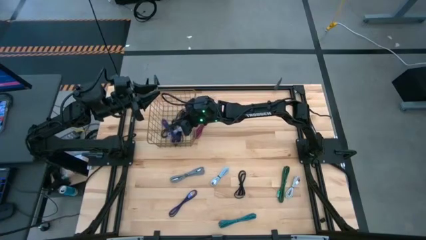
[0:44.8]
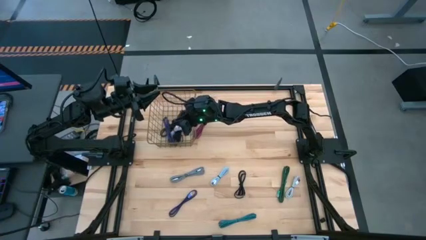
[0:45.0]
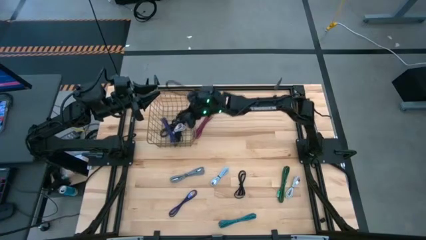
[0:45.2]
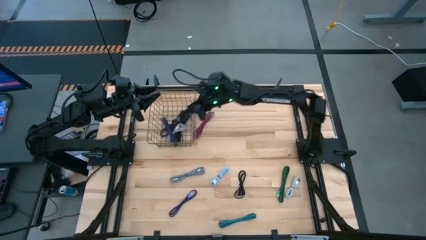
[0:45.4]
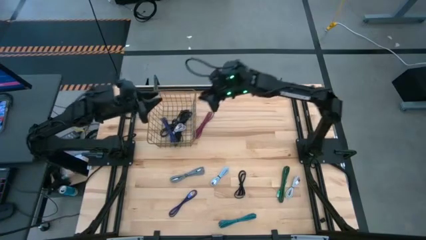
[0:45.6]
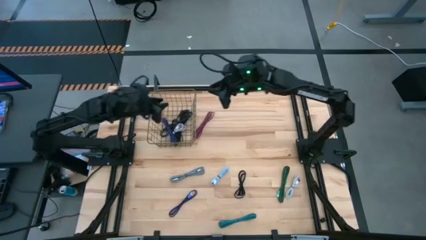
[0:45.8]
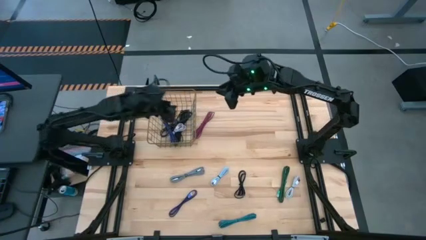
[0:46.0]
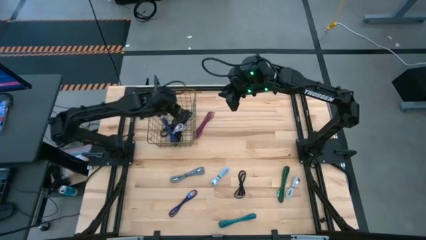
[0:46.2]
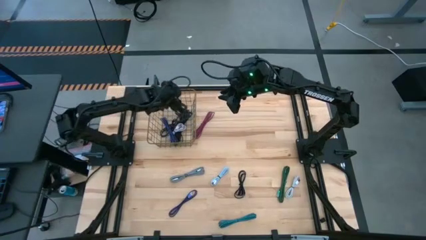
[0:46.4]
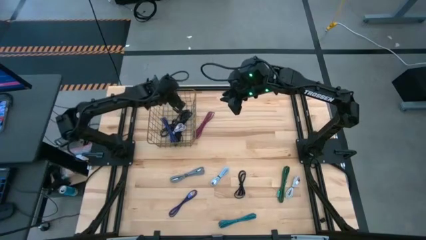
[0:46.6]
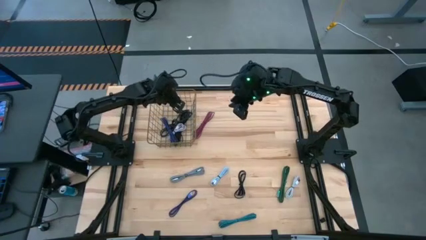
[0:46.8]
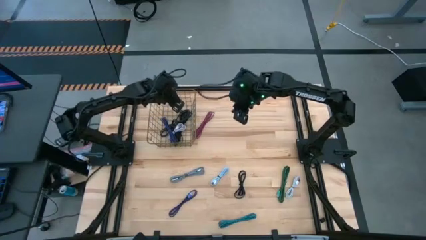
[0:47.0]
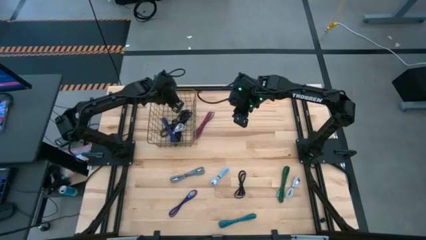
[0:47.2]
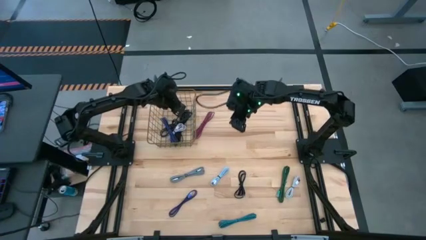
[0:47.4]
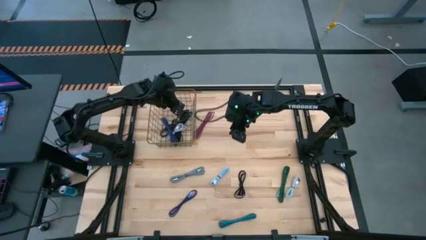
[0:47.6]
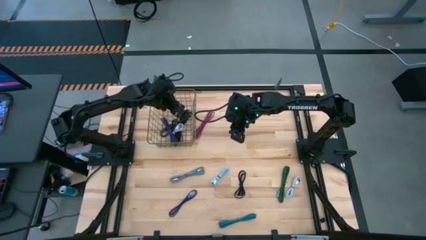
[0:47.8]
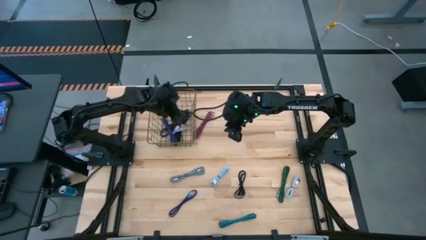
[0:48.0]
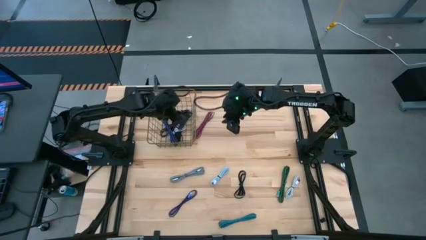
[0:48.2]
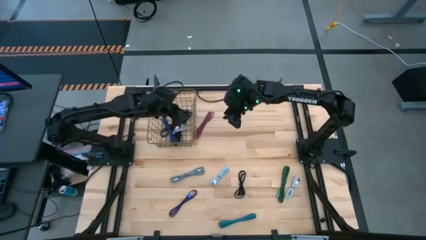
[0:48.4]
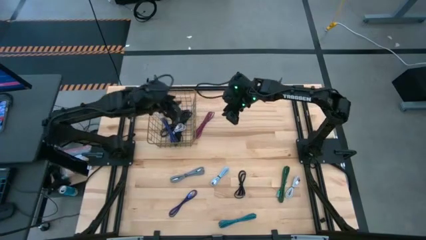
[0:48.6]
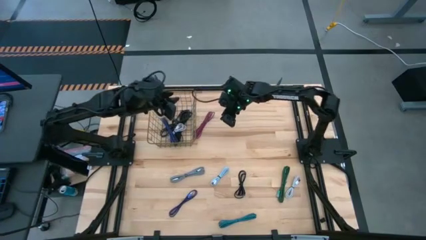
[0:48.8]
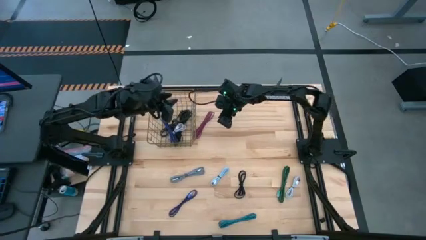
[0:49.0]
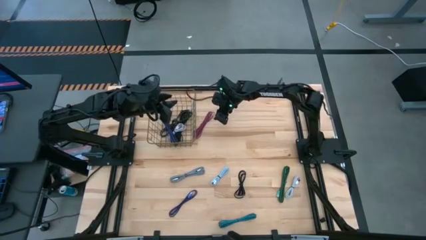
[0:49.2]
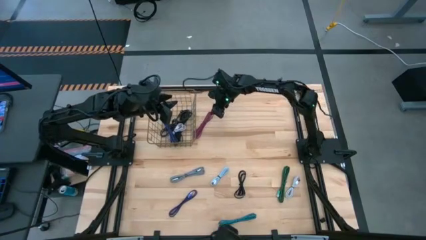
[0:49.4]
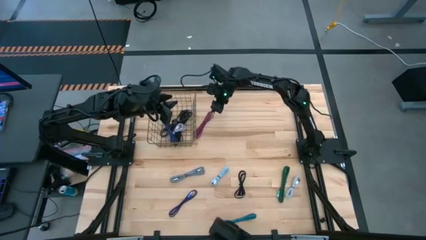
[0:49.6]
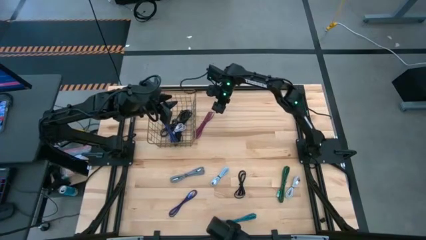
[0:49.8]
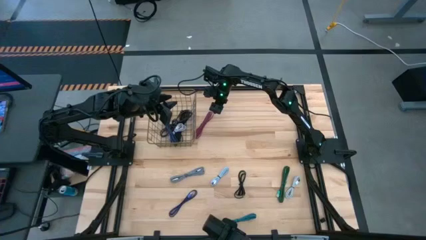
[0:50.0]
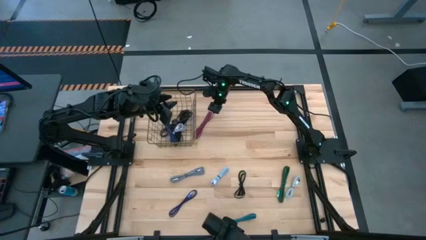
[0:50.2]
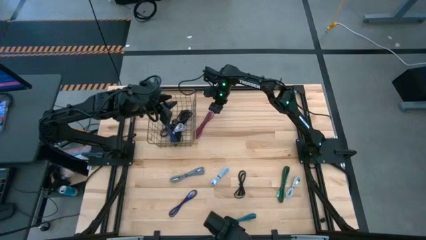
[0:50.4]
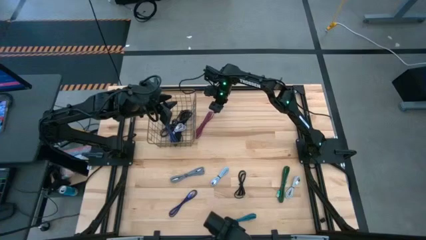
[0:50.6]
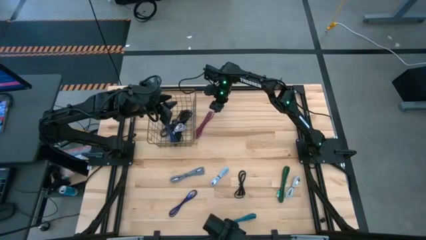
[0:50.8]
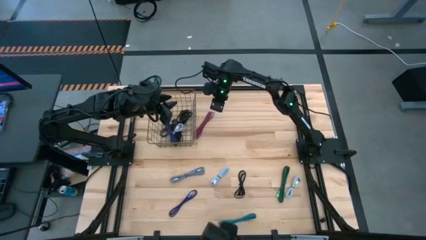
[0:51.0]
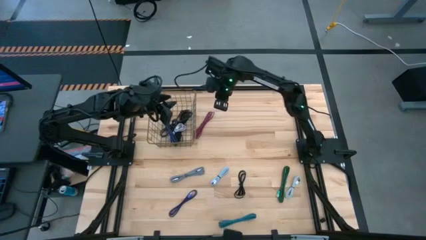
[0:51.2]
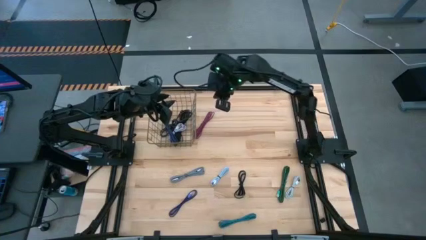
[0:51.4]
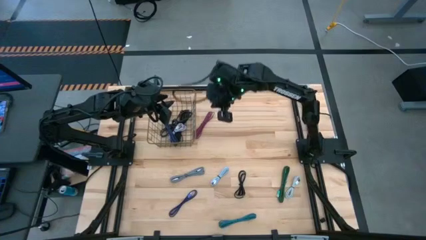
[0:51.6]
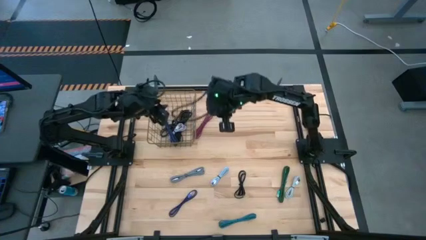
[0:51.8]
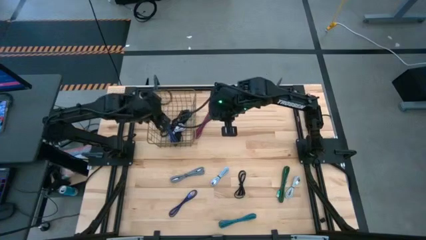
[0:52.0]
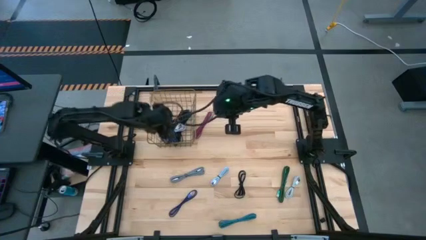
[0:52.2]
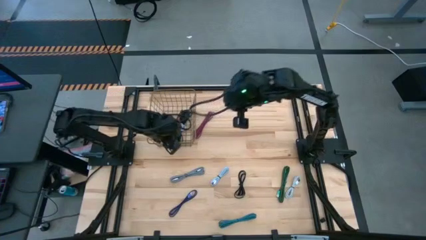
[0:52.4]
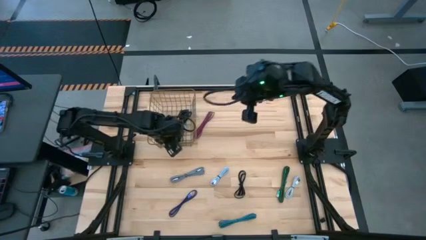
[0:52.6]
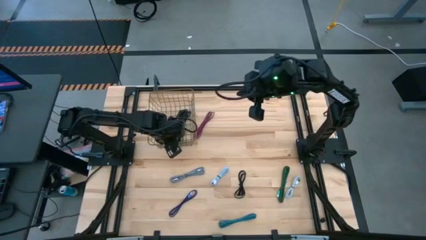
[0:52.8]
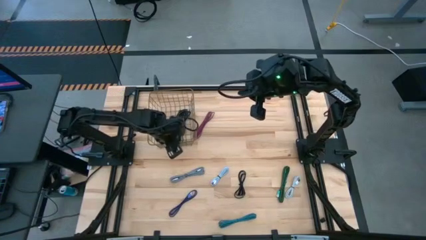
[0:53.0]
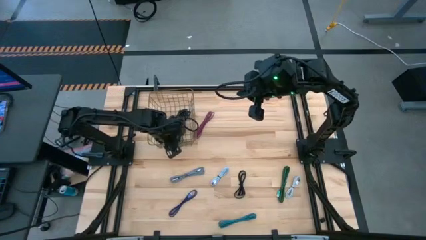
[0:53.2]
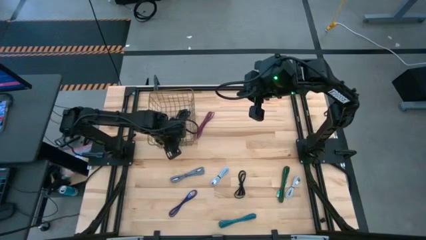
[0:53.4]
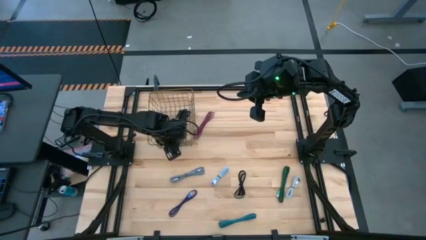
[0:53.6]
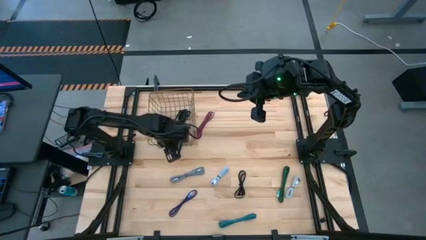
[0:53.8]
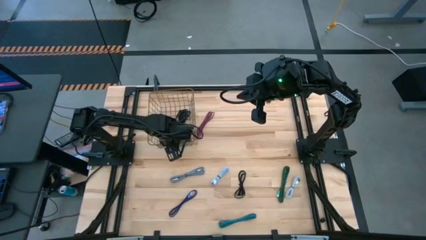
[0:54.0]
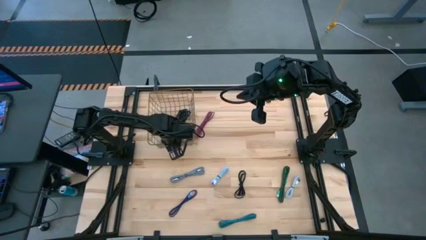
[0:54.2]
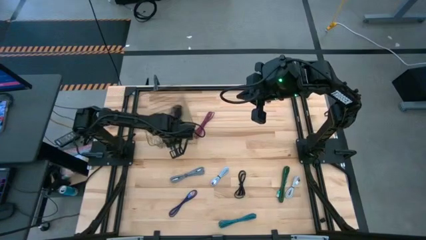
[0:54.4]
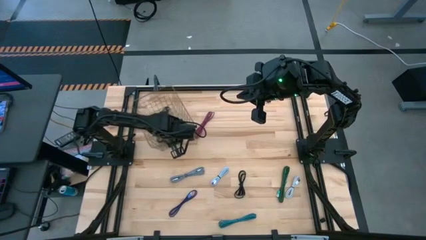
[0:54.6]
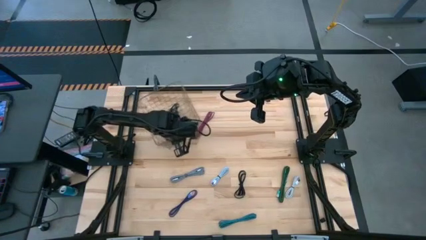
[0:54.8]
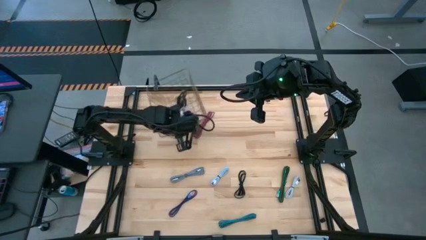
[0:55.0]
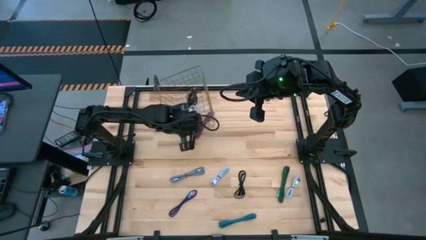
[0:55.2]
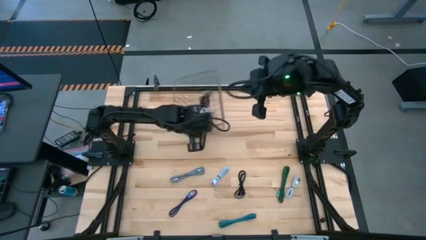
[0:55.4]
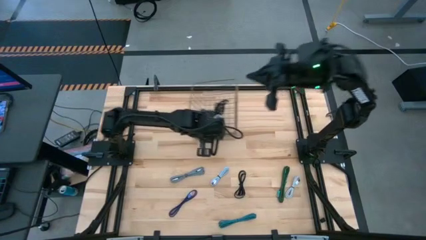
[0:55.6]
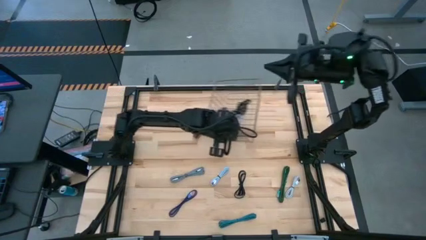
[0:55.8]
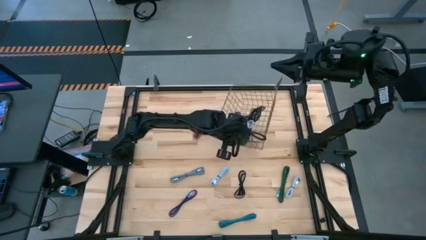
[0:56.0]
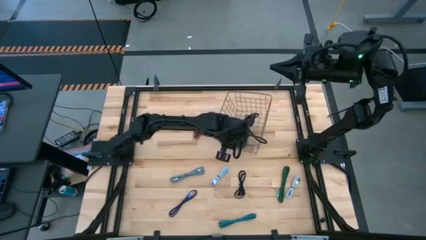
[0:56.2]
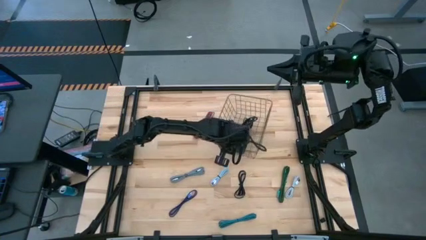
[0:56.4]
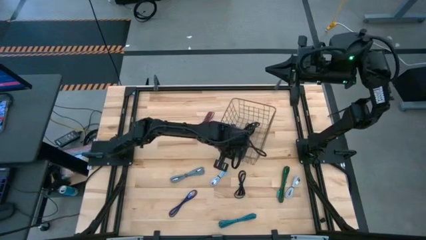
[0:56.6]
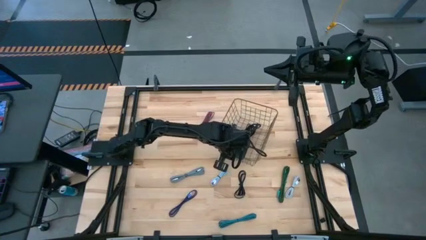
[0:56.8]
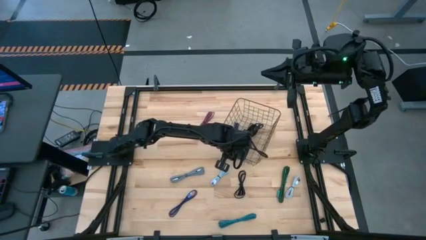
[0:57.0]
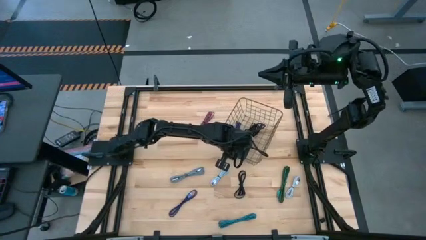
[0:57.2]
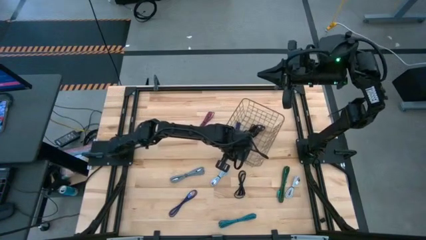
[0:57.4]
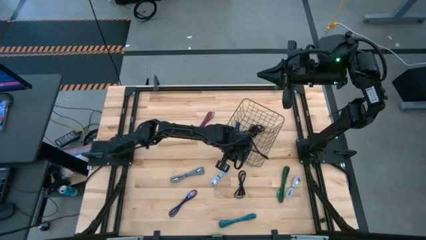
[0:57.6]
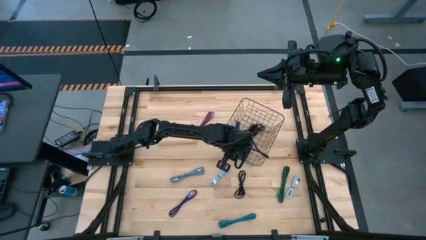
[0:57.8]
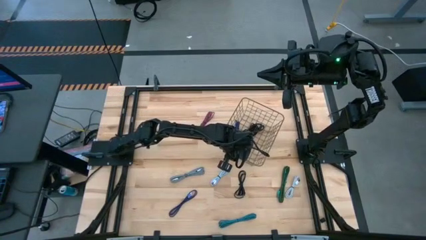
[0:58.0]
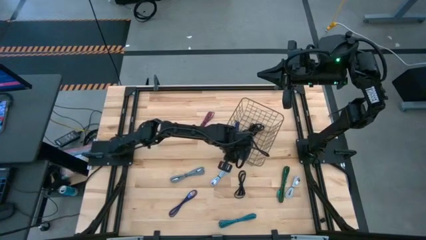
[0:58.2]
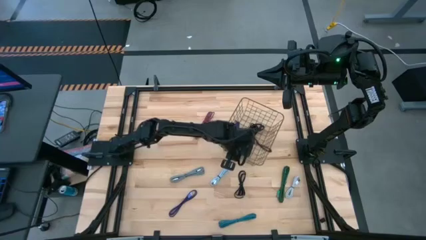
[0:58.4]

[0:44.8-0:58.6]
Task: Pick and place USB-C Cables
Move the gold wire basket to the top right of the table

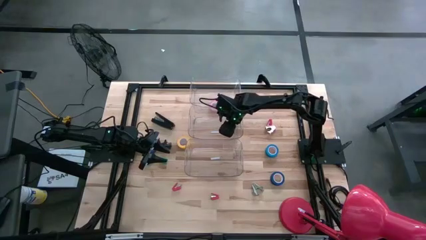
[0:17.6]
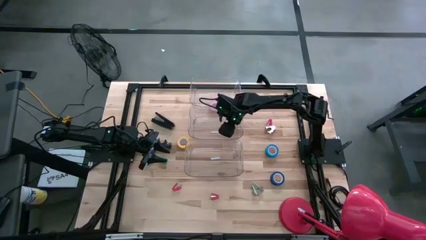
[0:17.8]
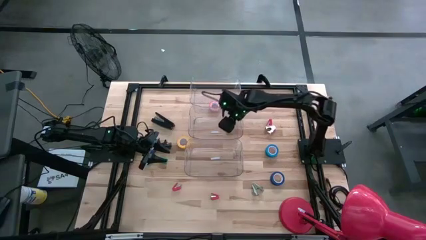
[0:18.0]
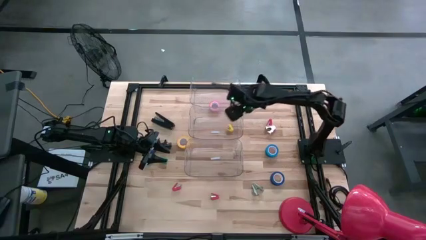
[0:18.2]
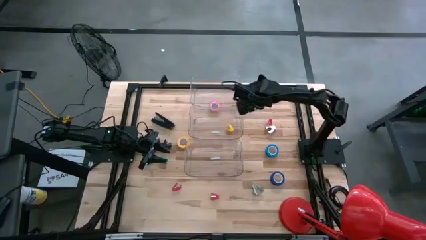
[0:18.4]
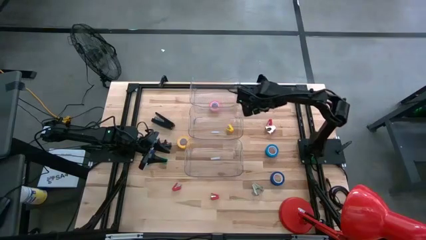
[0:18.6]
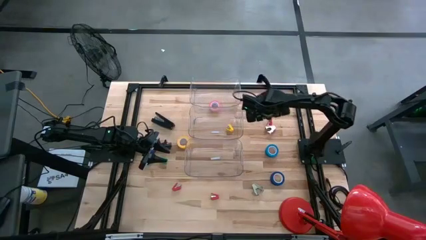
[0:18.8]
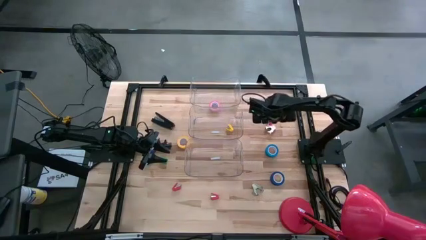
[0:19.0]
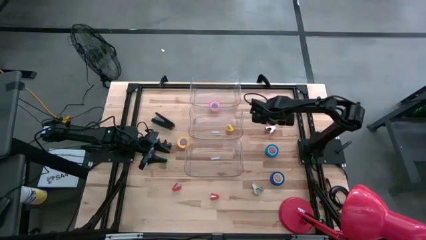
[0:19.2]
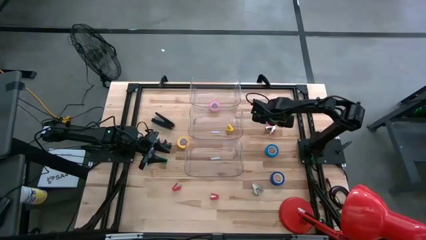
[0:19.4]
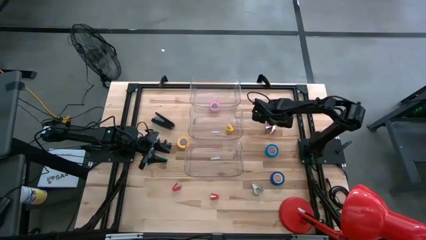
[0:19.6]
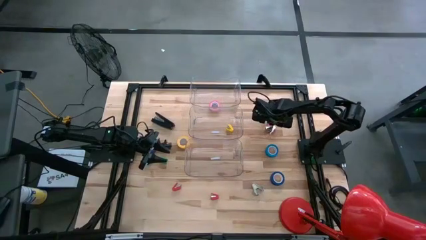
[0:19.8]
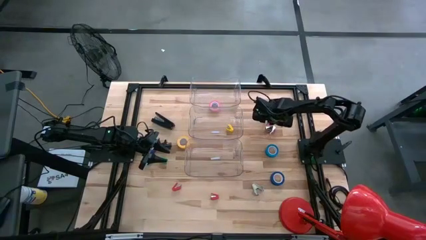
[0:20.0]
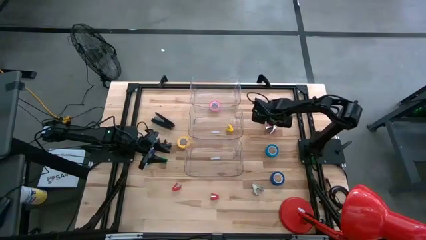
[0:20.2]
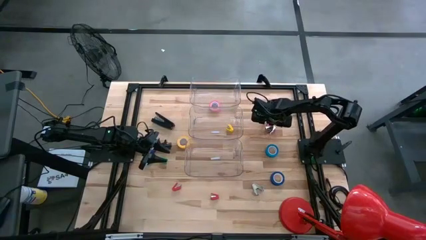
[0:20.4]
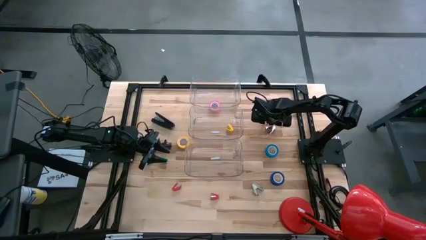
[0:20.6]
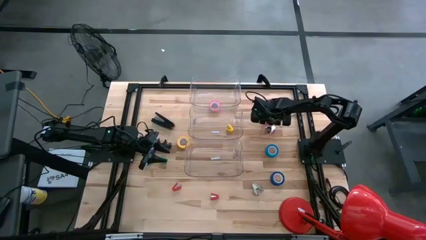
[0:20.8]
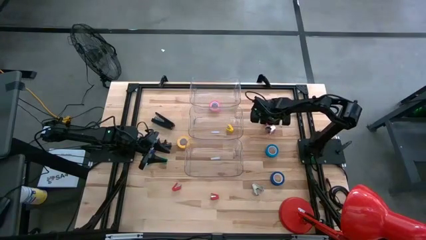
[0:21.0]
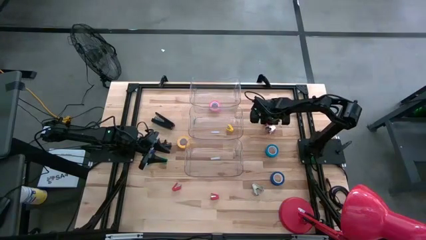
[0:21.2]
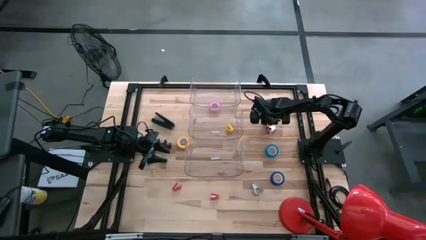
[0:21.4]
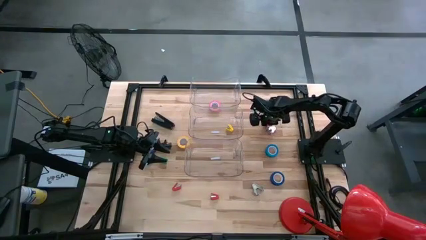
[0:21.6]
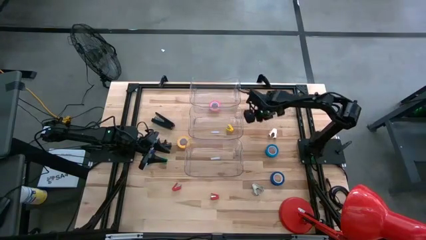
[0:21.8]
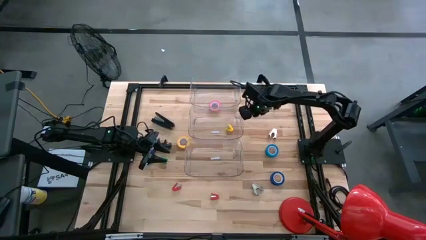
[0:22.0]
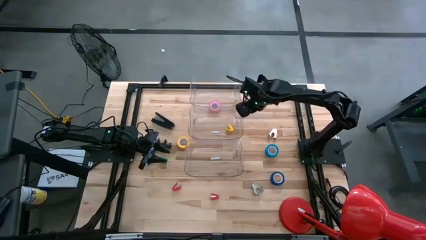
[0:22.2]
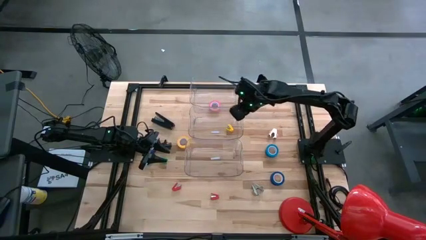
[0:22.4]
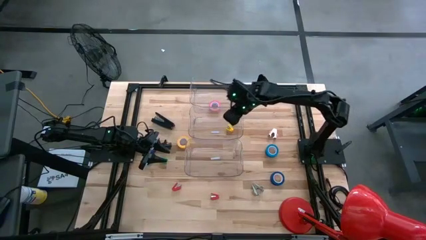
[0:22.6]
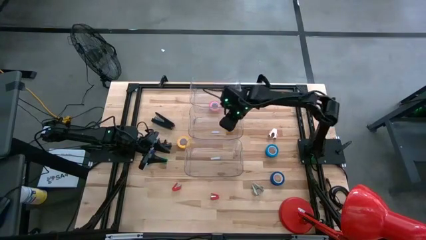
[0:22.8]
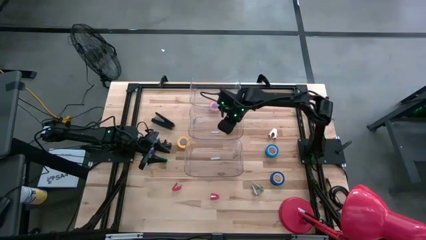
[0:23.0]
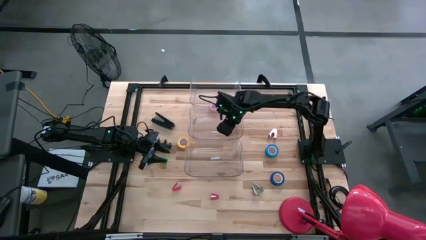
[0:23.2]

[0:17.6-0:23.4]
Task: Pick and place Stapler, Stapler remover, tape
Put the top red stapler into the middle transparent bin
